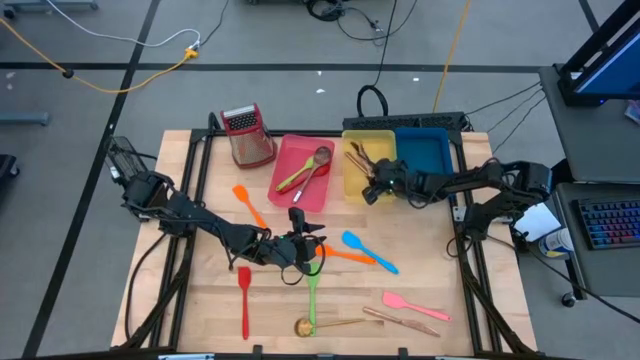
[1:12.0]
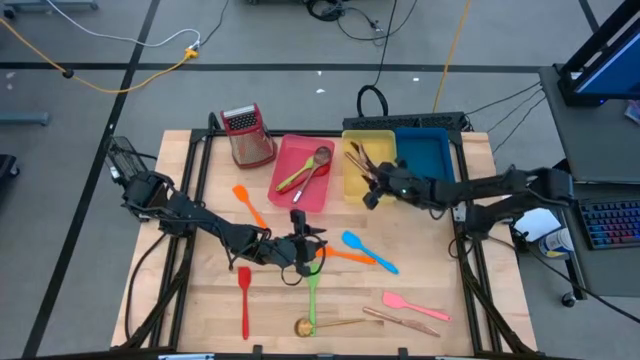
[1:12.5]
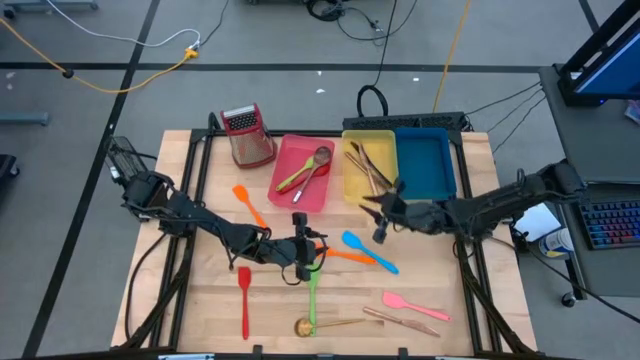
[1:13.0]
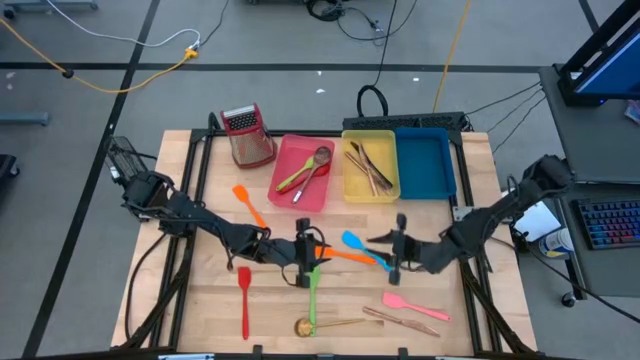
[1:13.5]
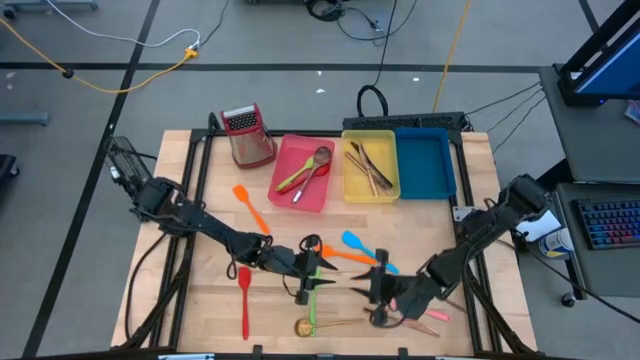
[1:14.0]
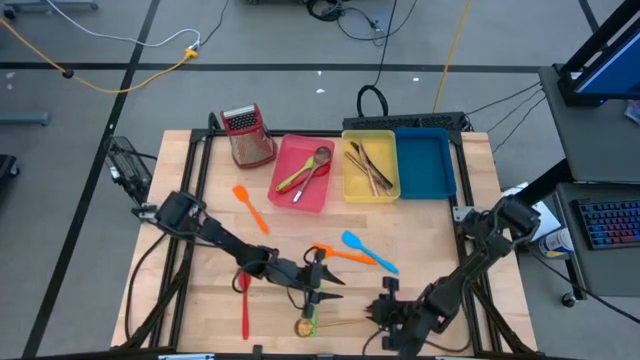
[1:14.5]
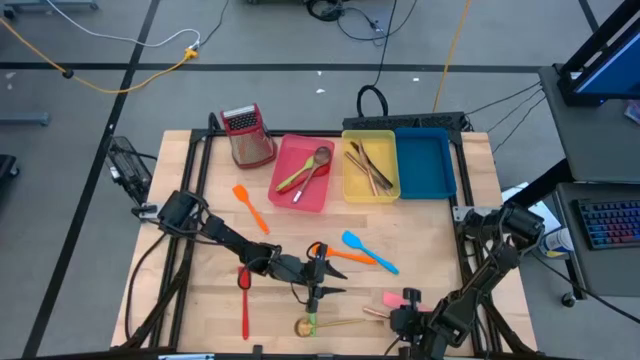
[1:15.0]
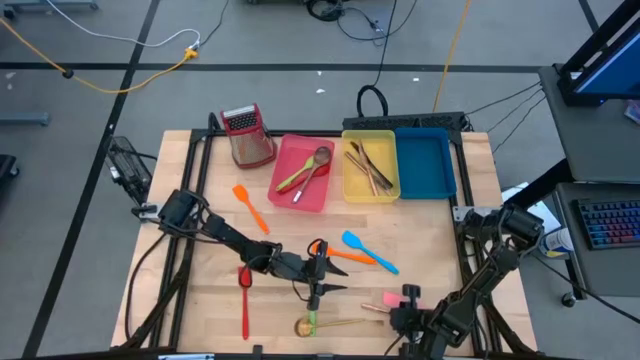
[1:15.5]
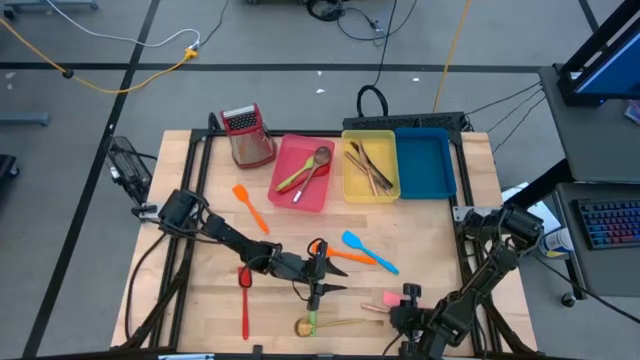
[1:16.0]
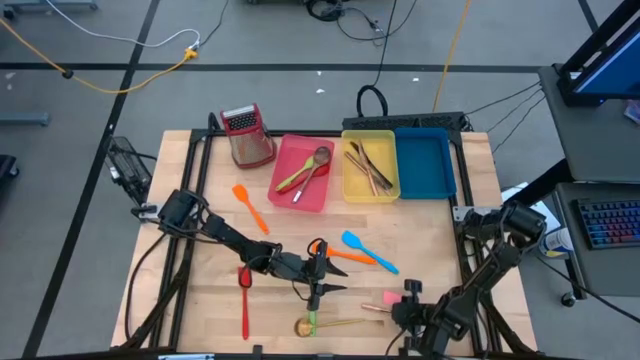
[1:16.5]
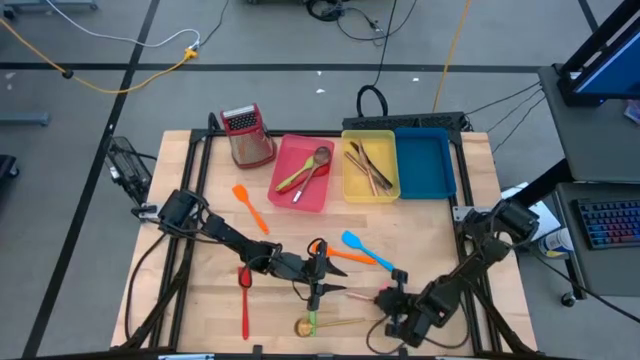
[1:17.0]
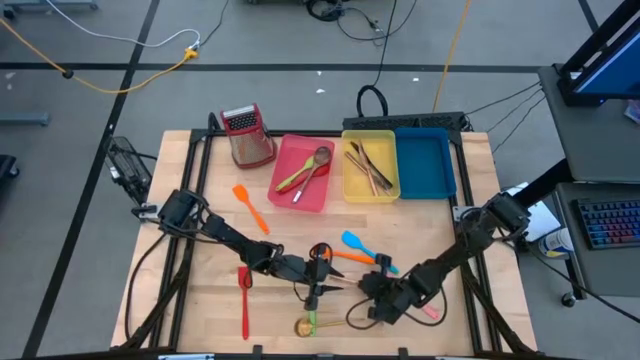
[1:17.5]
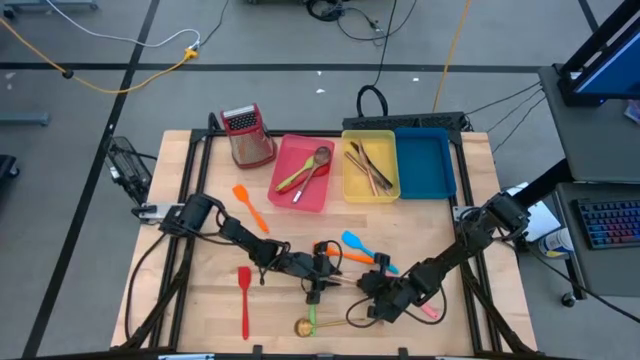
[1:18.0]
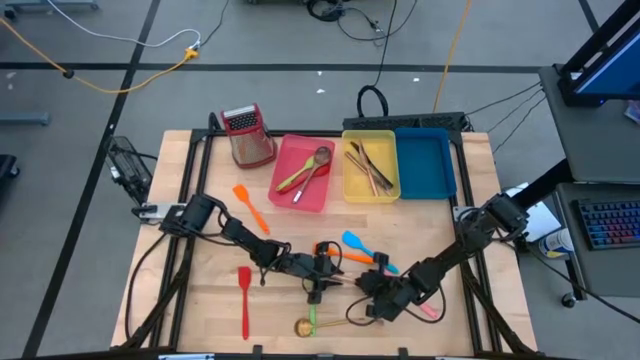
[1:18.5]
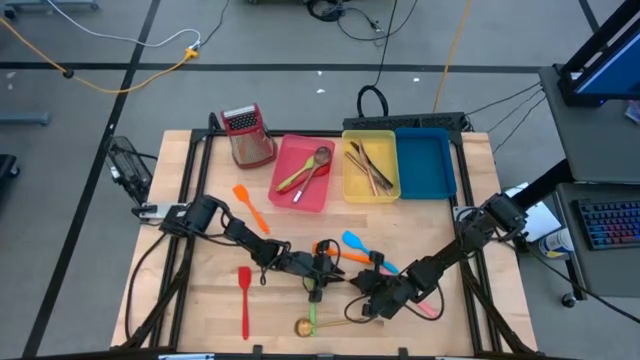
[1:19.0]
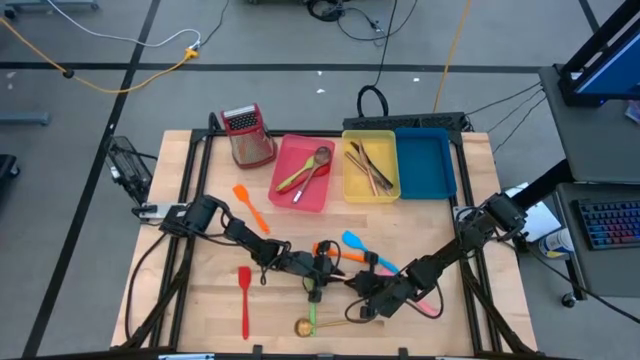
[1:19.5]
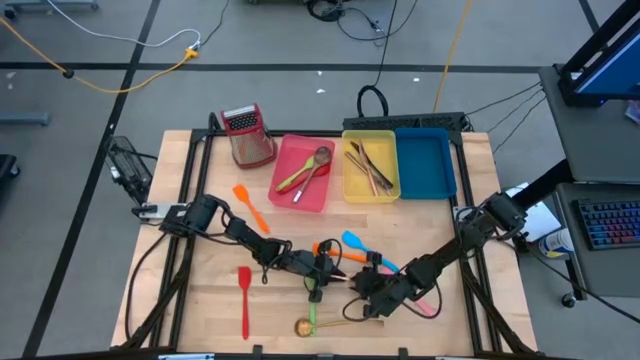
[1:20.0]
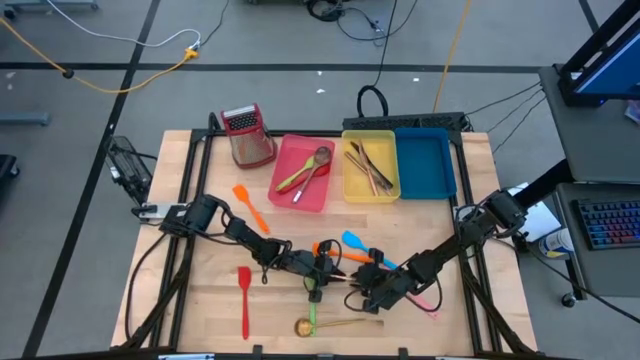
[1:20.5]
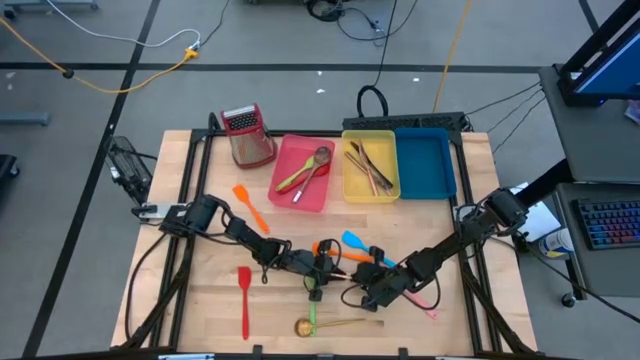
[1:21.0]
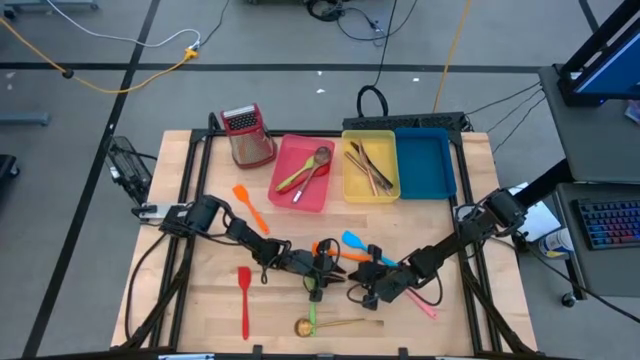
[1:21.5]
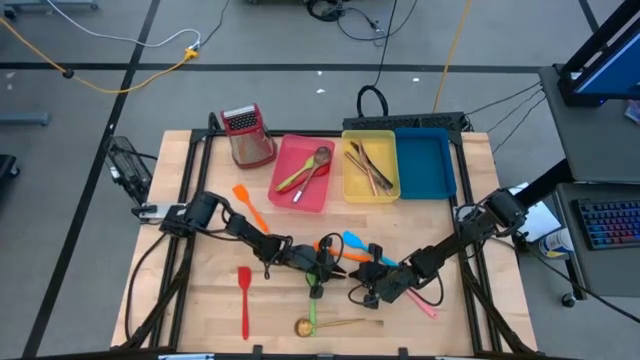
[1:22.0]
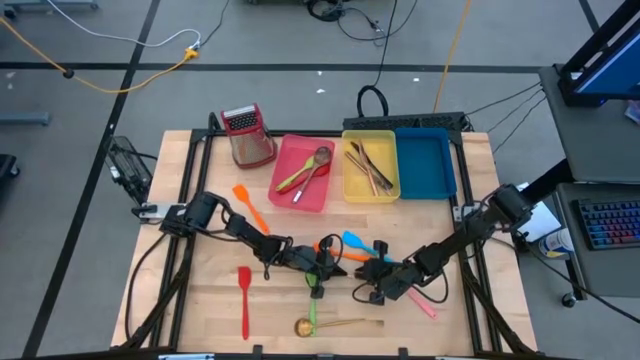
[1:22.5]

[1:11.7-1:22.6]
Task: Pick & Place Kitchen Items
Put the gold table knife into the yellow bin

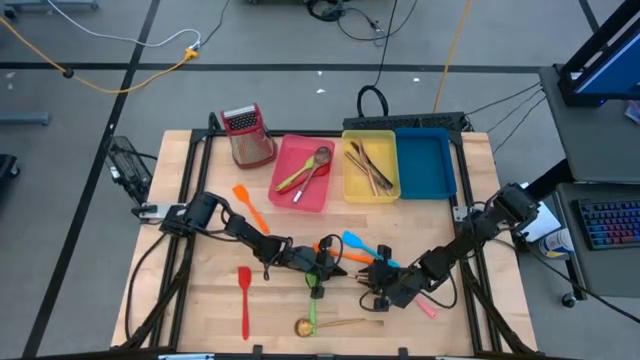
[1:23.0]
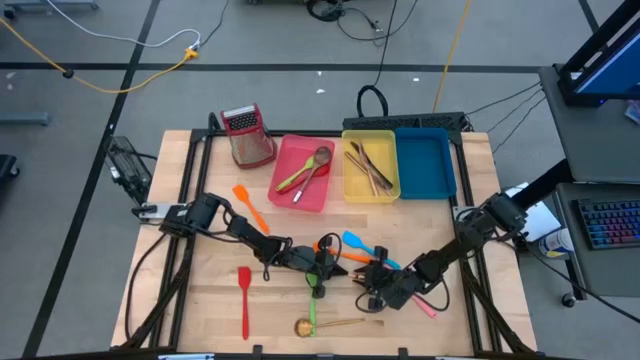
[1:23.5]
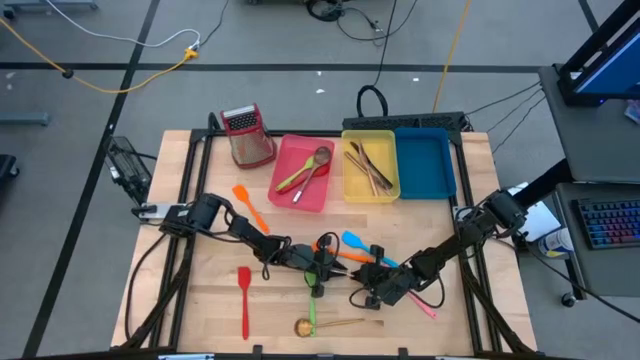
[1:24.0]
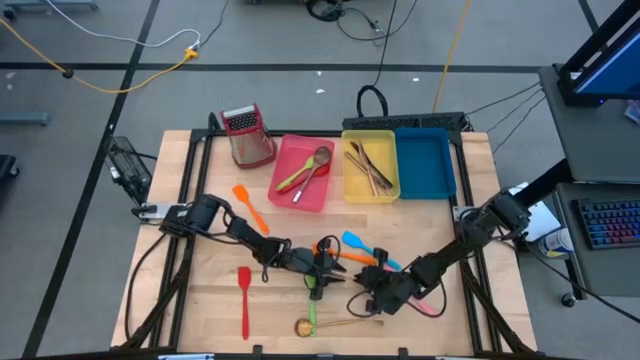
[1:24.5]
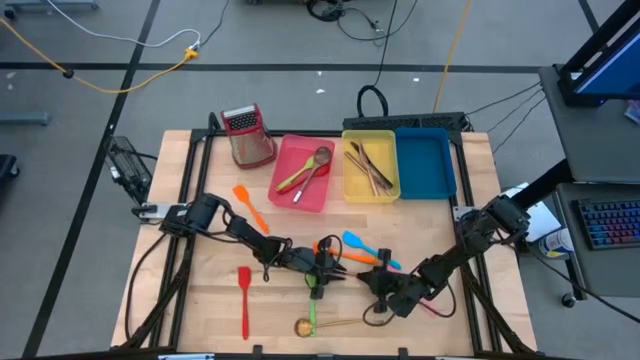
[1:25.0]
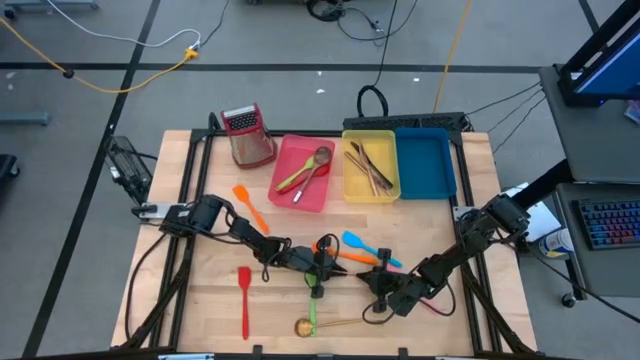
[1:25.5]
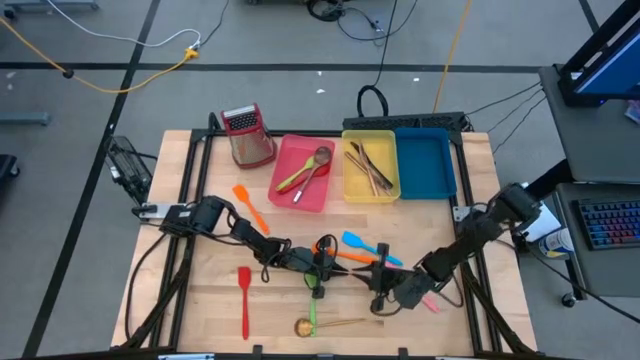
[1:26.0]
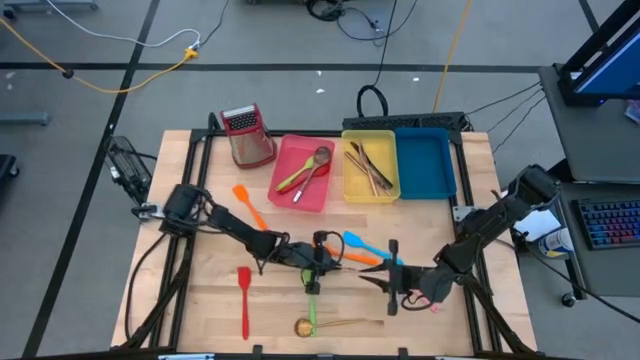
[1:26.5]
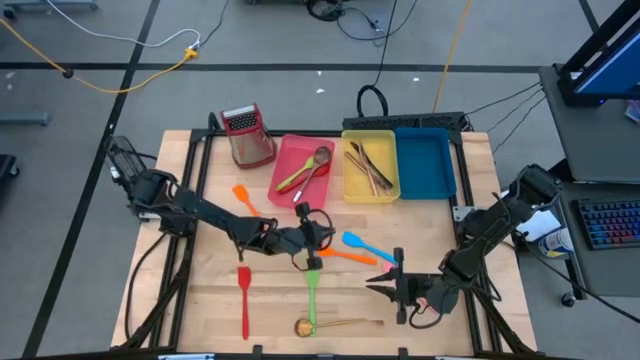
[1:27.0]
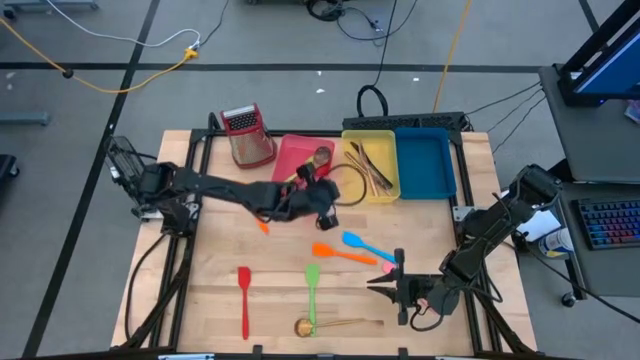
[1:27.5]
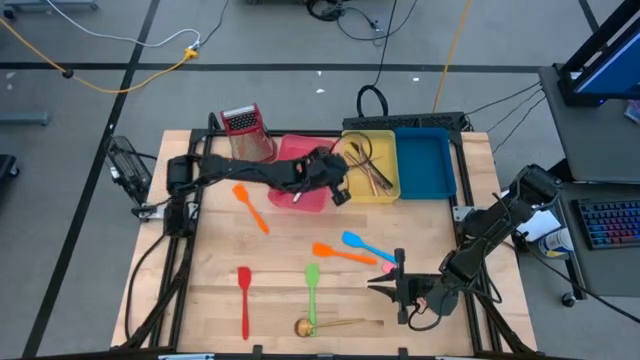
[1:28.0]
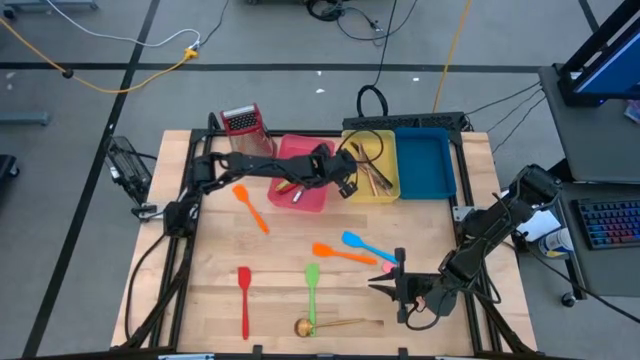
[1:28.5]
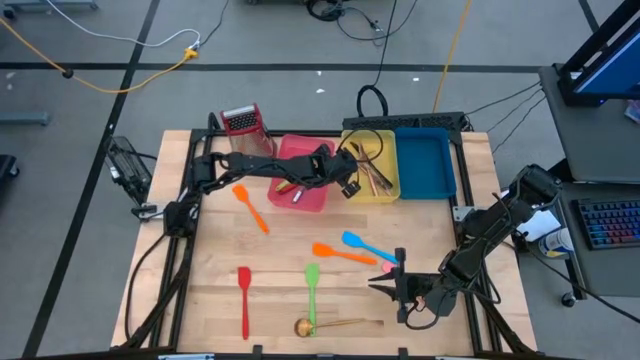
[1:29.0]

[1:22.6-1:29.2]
Put the gold table knife into the yellow bin

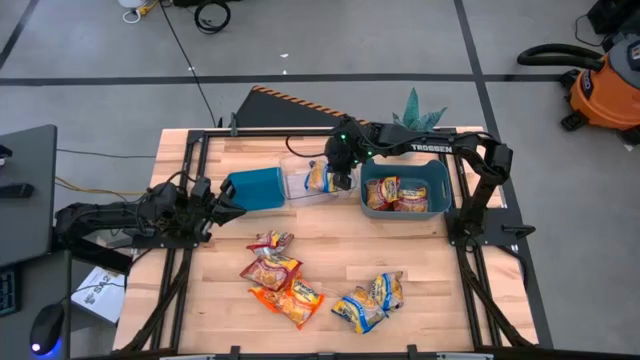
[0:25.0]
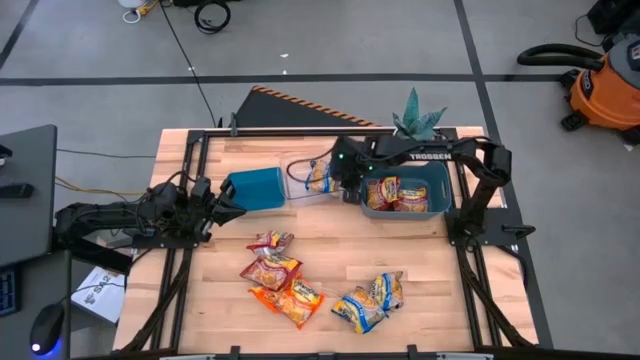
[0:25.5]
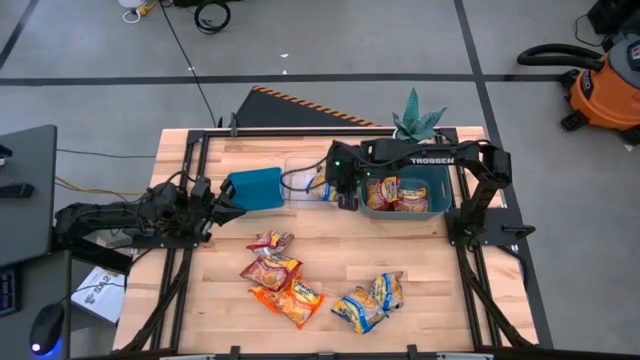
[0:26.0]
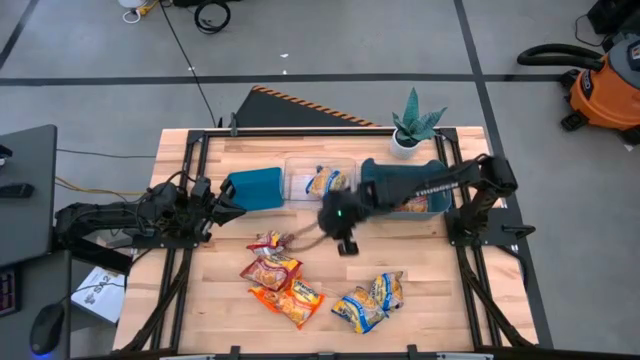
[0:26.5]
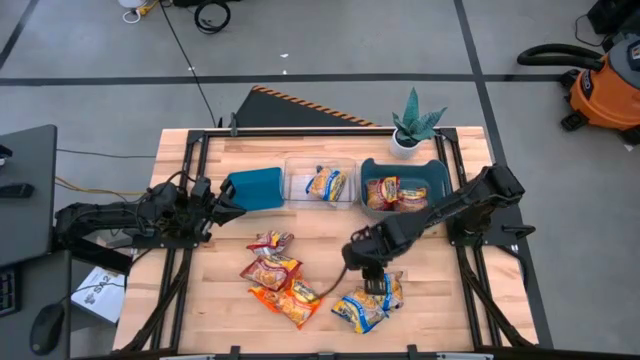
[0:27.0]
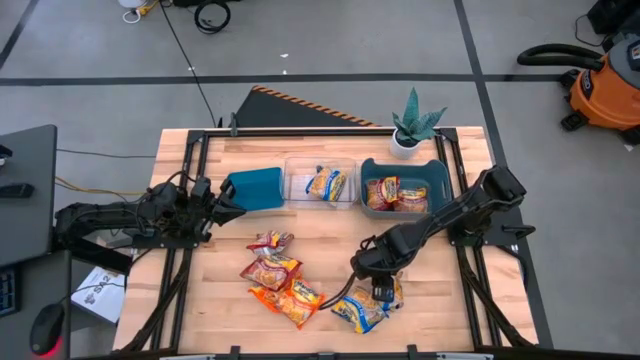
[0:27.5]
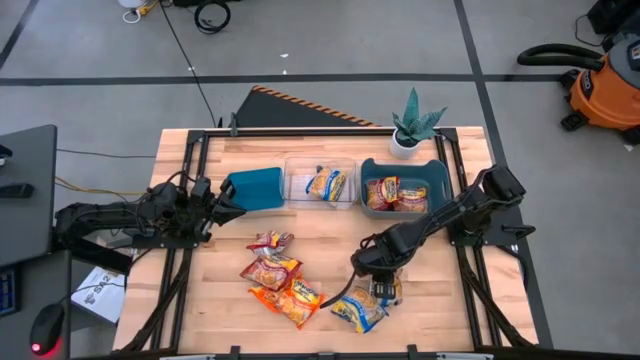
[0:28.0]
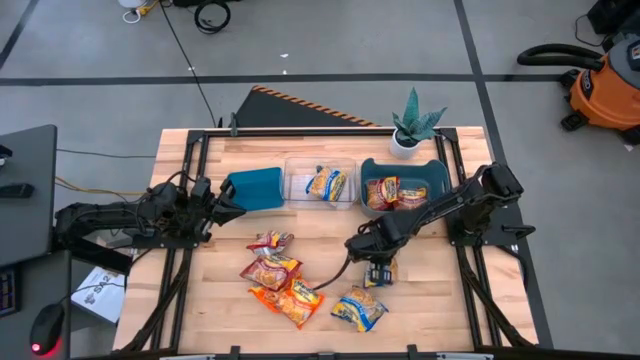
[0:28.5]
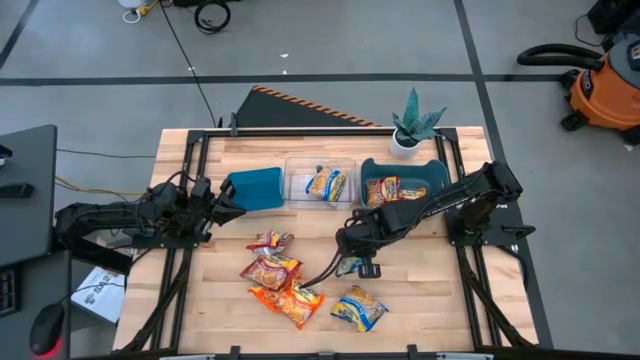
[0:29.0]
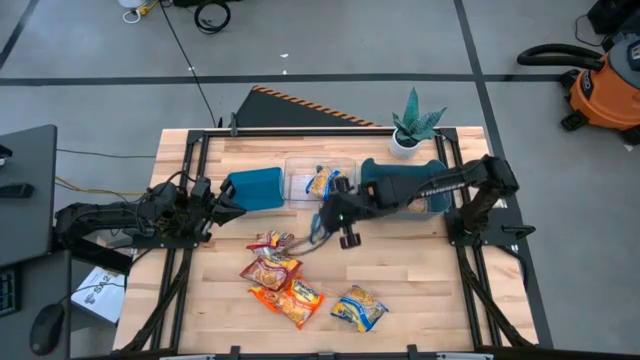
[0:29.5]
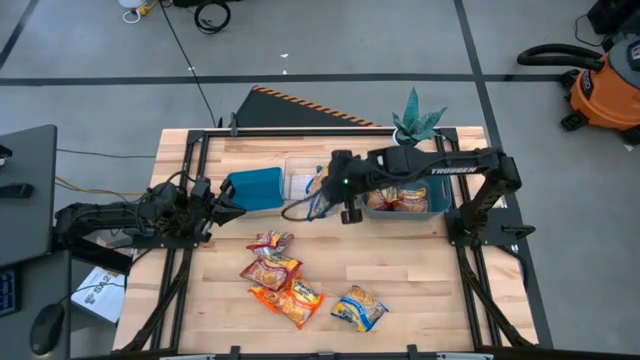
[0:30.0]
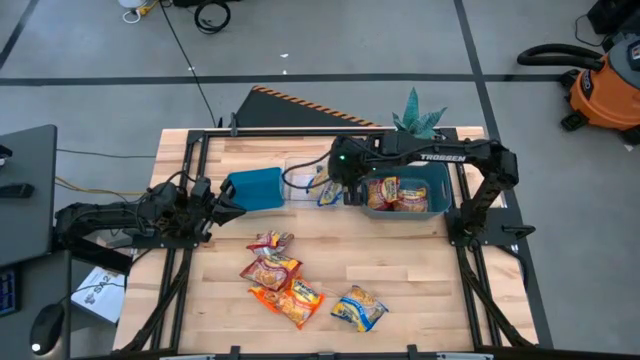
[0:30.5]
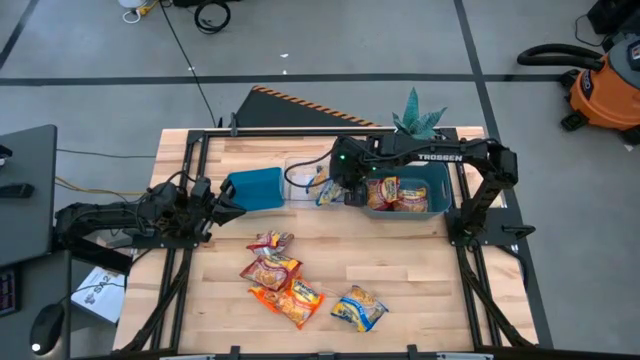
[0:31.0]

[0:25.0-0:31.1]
Task: Sort Maruchan noodles
Put the right blue noddle pack into the transparent bin
